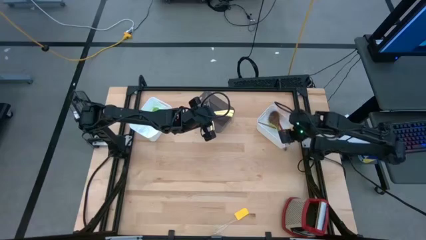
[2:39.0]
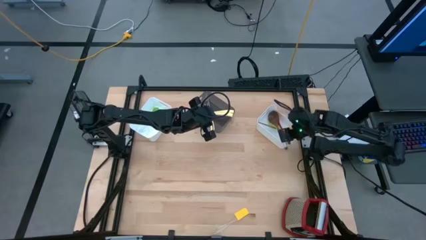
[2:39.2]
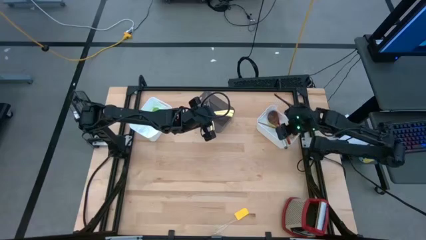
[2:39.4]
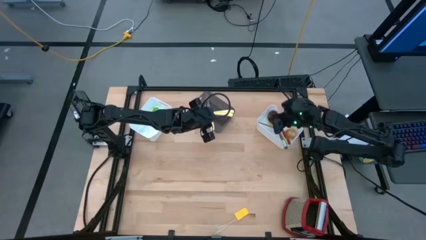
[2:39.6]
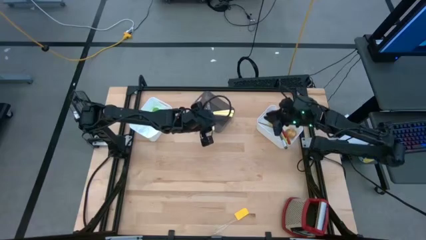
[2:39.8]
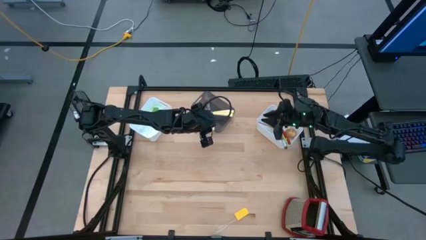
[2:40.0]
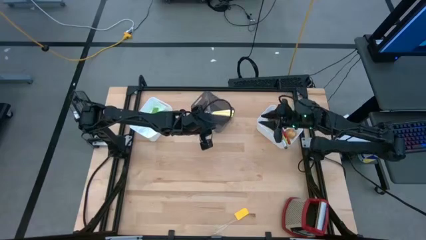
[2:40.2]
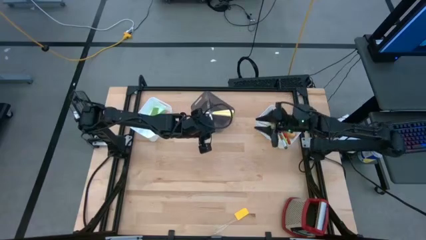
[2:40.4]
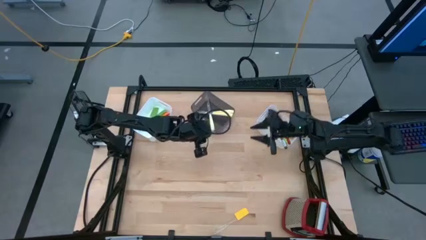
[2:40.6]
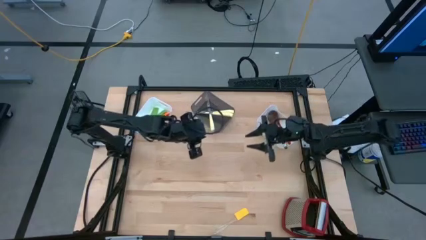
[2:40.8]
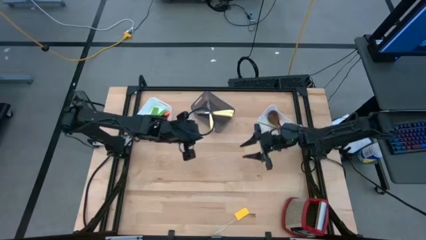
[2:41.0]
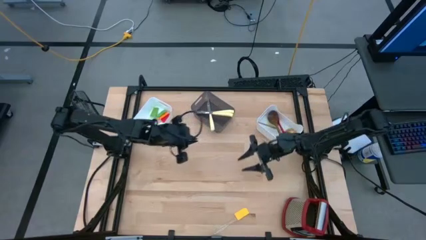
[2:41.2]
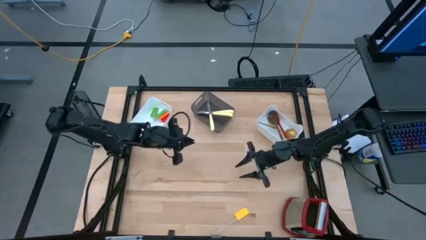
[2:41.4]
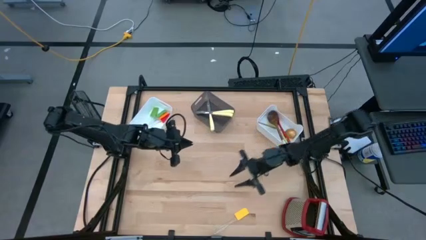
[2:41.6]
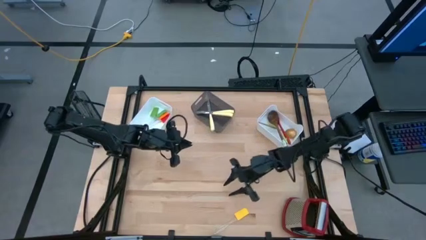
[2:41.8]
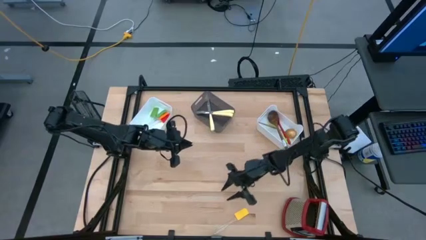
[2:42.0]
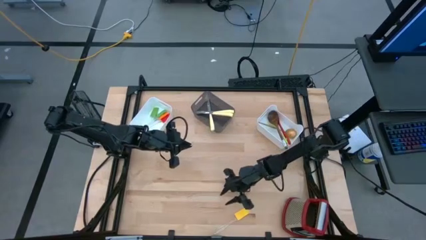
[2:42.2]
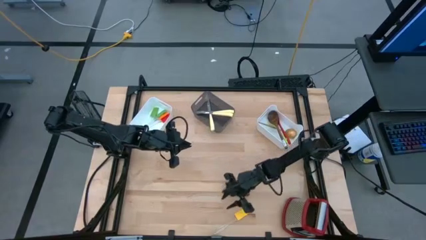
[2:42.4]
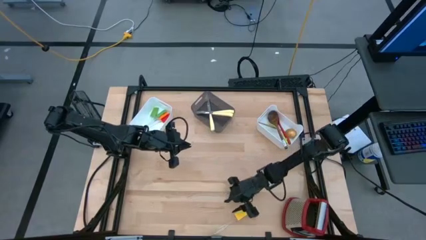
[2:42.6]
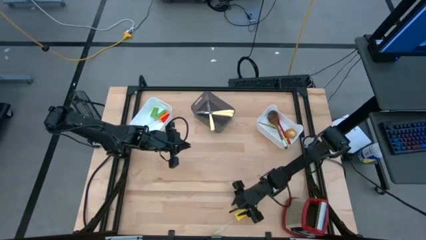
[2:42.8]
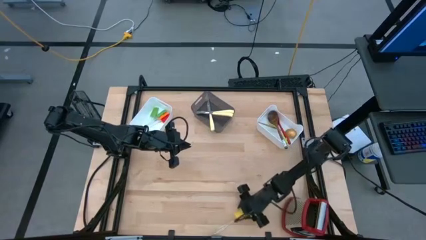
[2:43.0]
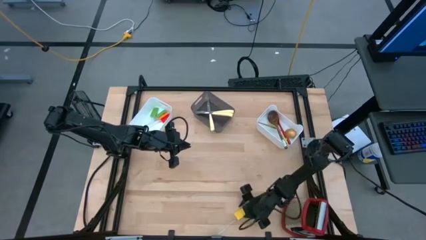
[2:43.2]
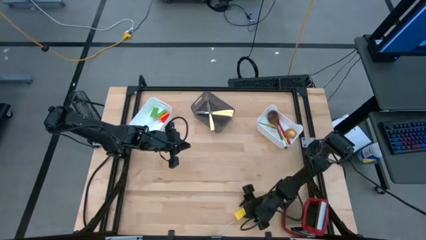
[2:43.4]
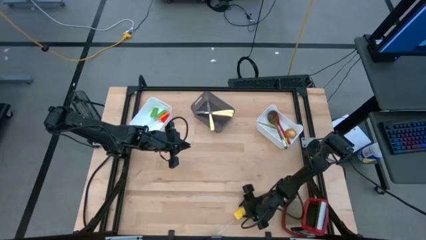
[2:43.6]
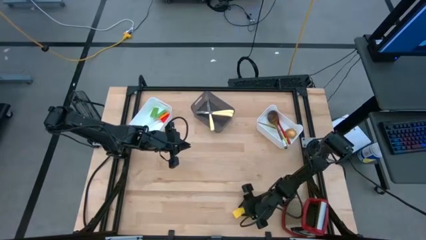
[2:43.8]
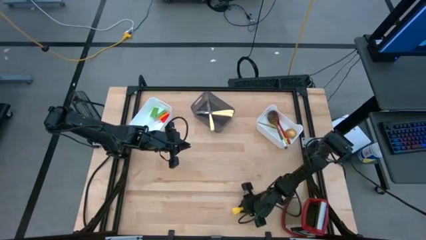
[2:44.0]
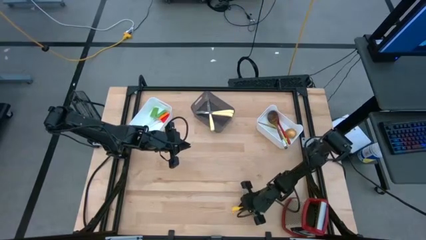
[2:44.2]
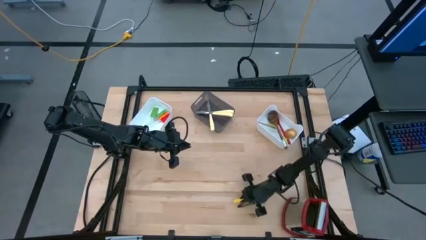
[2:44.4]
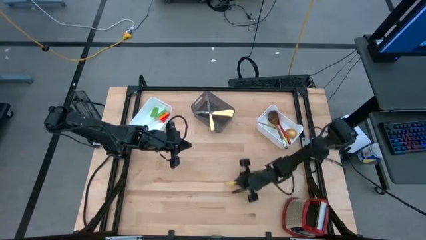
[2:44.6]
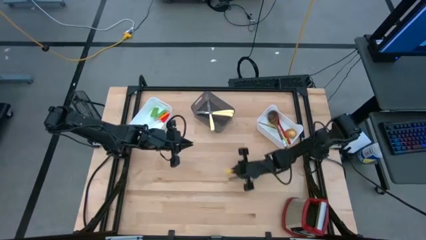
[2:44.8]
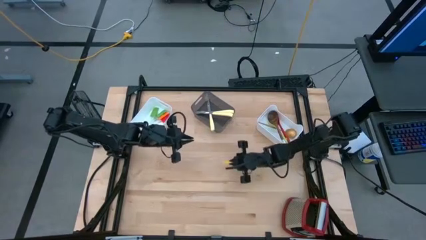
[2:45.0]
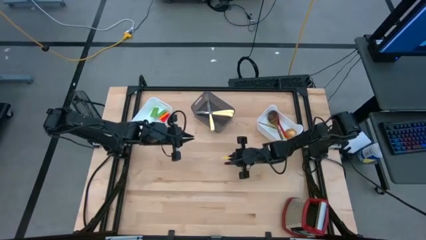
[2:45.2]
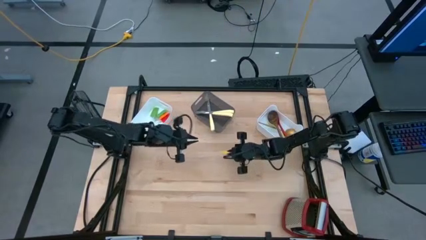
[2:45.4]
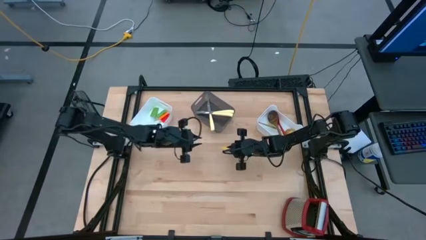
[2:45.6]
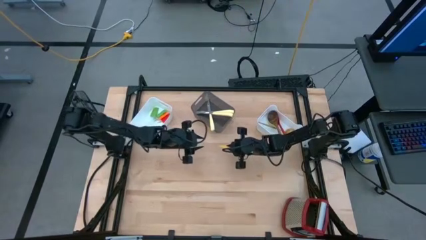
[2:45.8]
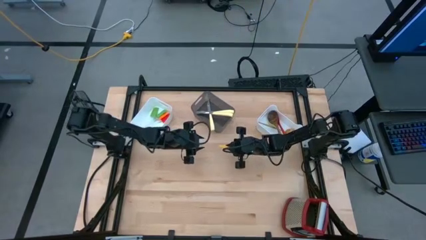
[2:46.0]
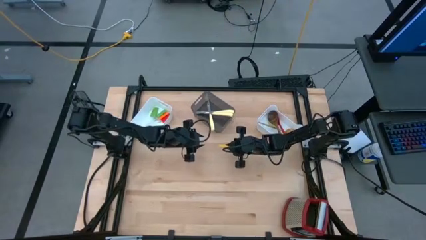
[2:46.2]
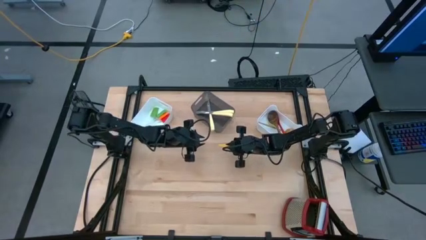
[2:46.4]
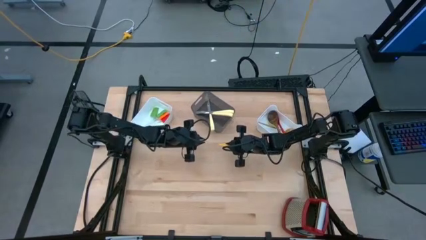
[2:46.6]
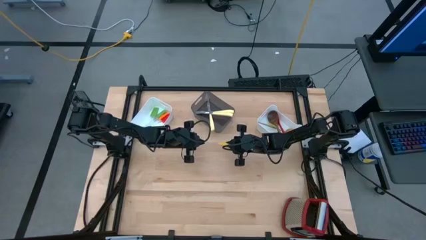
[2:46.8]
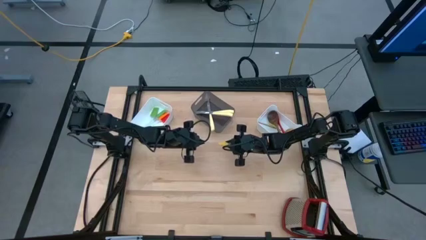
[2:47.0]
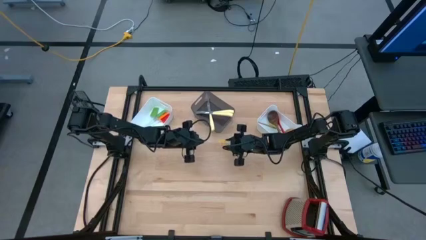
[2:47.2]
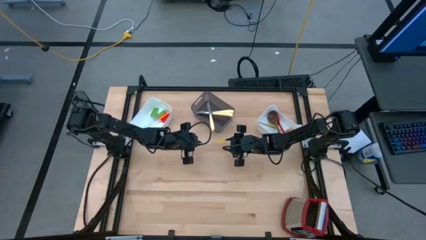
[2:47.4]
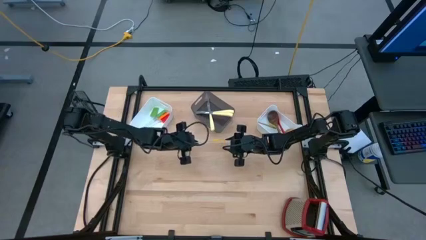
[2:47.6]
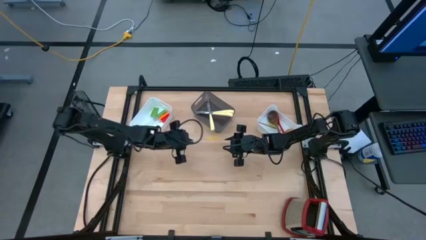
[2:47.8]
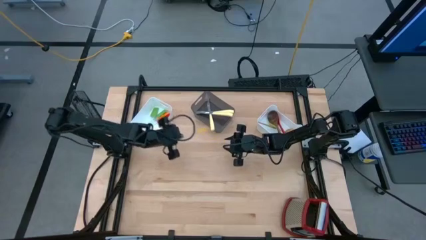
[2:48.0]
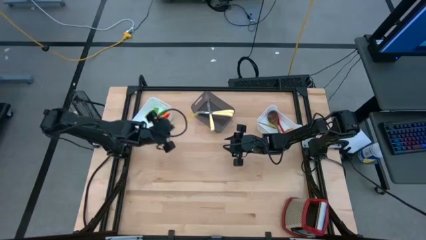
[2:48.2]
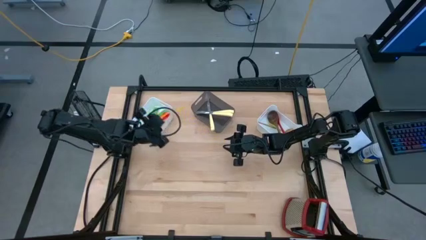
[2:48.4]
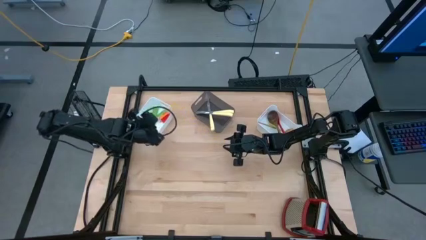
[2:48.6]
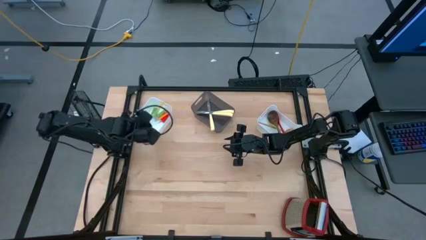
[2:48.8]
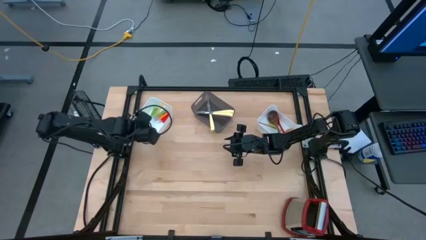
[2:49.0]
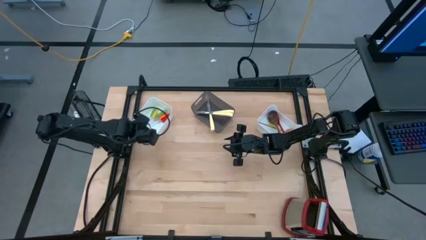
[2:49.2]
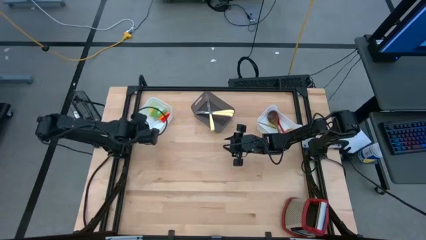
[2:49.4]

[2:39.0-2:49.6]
Task: Pick & Place Kitchen Items
Put the yellow spatula into the left white bin

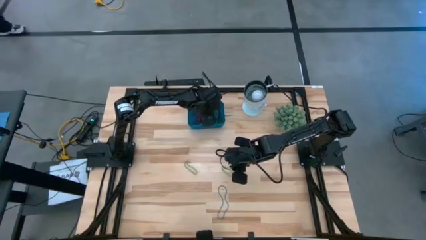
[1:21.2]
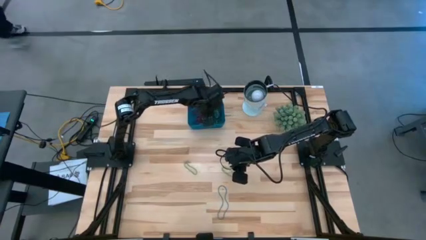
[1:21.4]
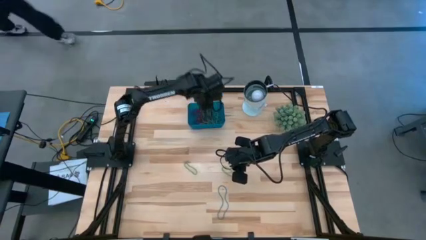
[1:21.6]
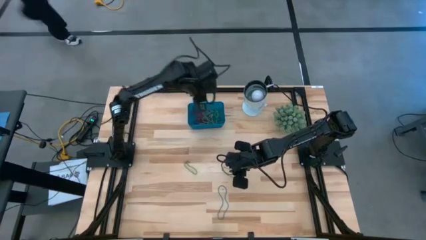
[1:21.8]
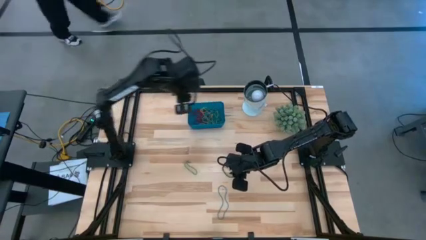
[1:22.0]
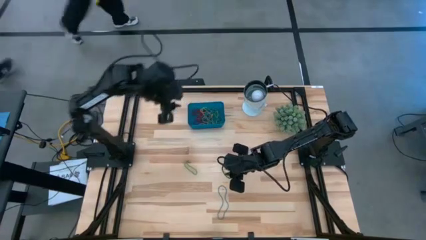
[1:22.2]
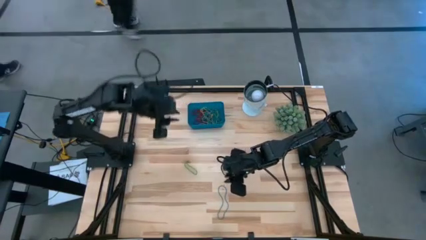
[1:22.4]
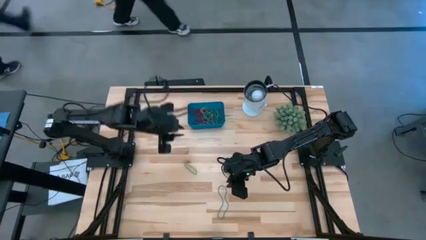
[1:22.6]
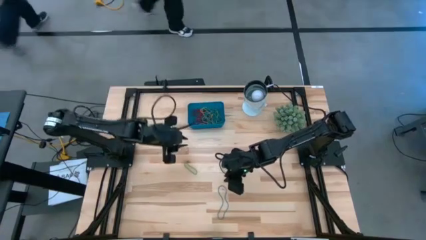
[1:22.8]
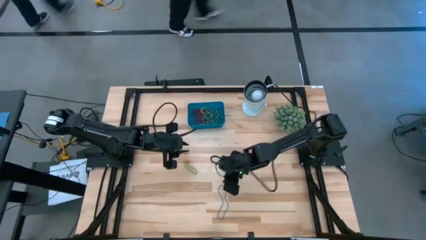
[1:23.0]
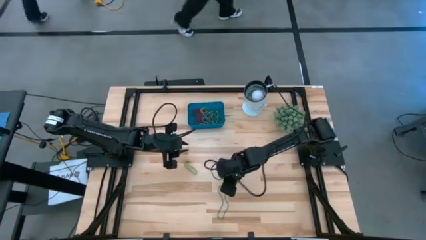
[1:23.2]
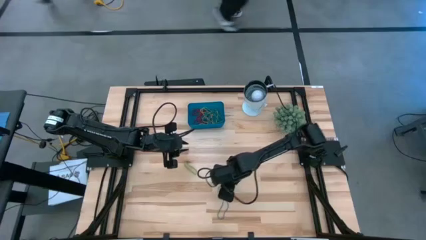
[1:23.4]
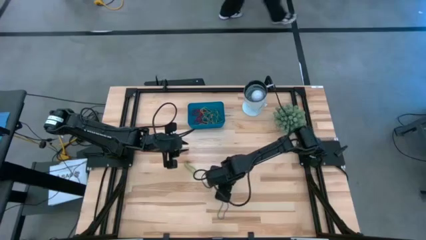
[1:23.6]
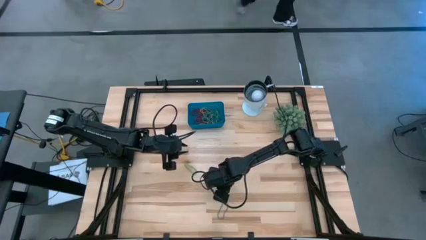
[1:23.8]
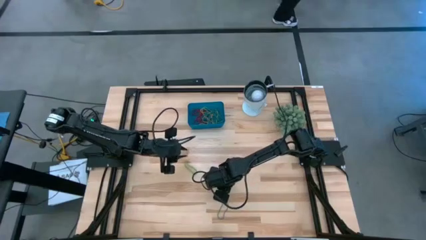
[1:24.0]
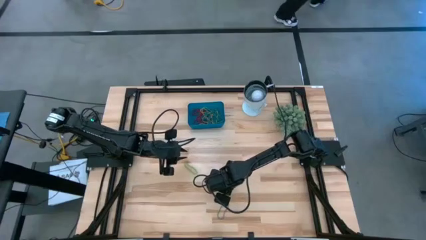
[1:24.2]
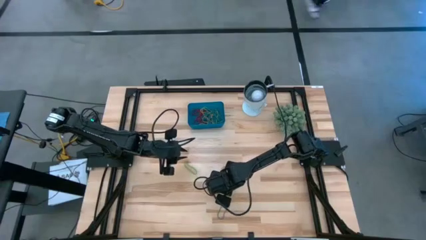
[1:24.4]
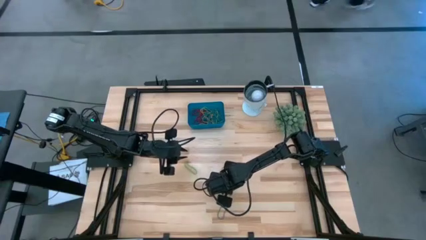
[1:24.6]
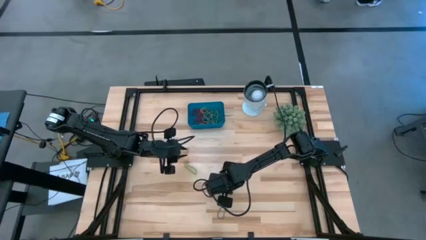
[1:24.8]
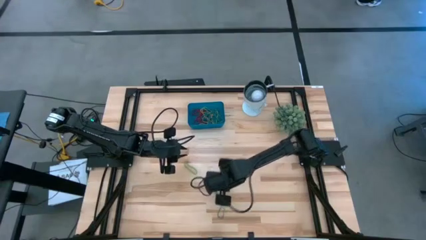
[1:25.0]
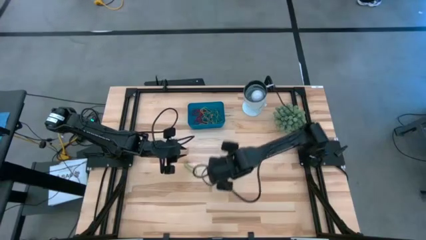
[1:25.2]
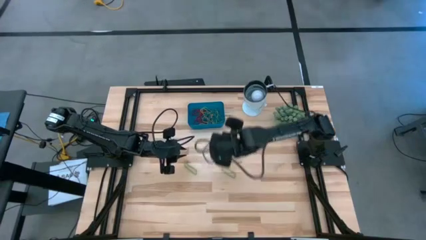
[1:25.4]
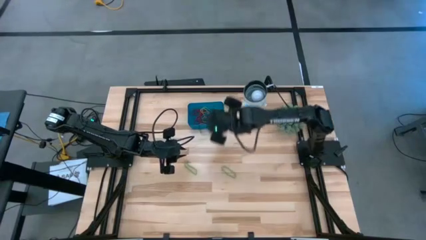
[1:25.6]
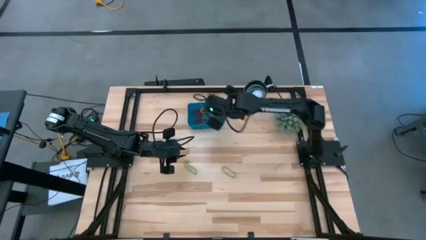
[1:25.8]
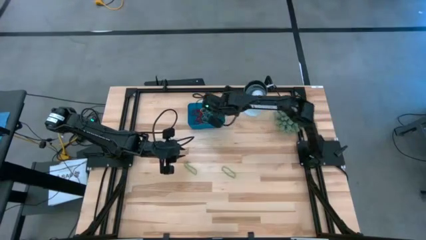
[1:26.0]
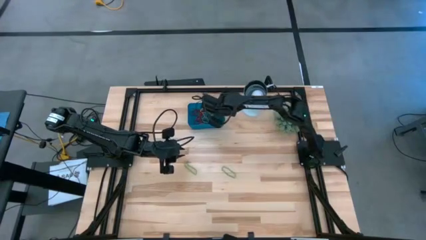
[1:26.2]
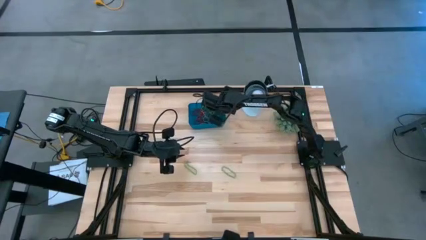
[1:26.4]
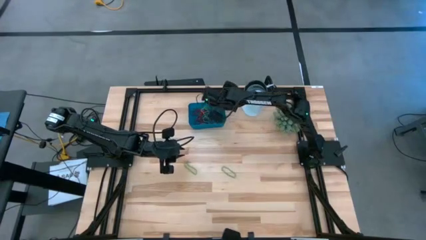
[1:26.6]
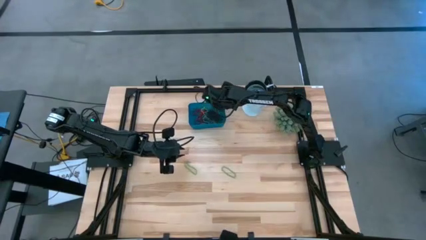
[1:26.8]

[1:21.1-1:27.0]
Task: Pick and place items into bin
Put the blue rubber band into the blue bin
